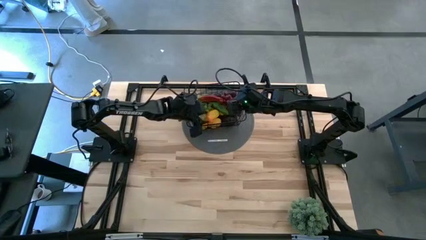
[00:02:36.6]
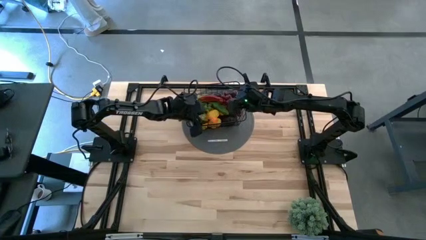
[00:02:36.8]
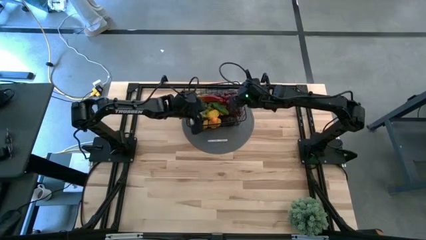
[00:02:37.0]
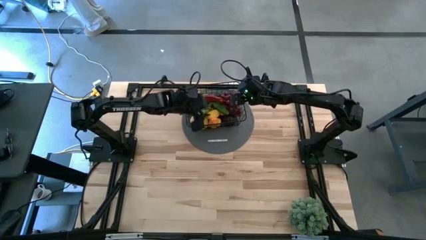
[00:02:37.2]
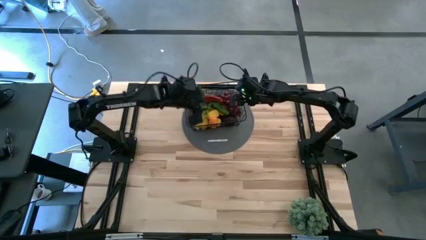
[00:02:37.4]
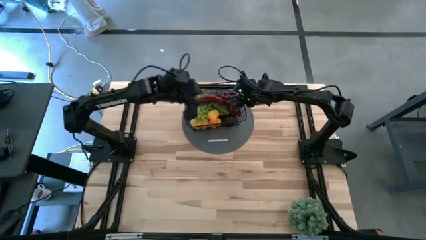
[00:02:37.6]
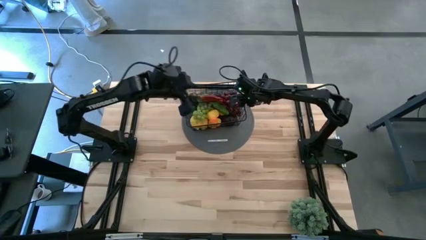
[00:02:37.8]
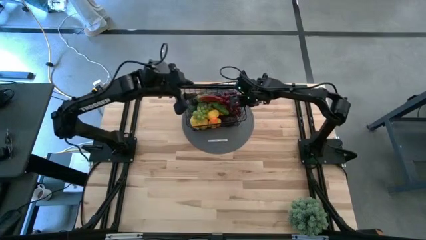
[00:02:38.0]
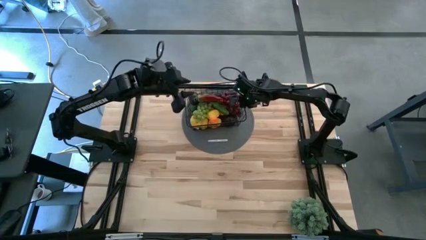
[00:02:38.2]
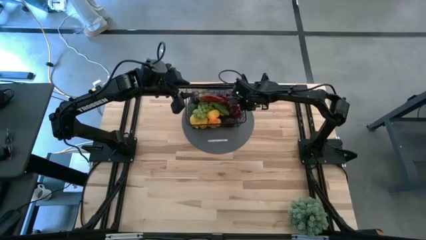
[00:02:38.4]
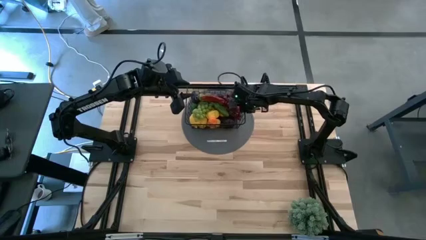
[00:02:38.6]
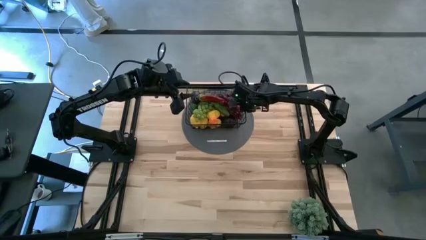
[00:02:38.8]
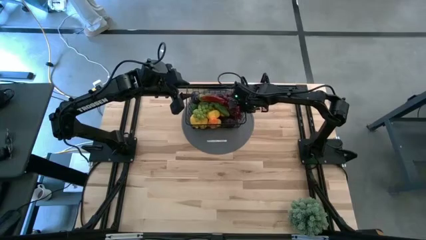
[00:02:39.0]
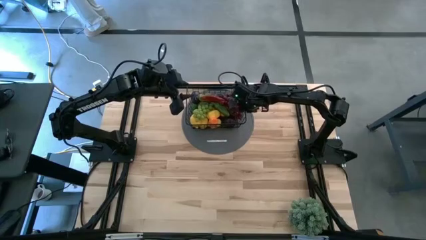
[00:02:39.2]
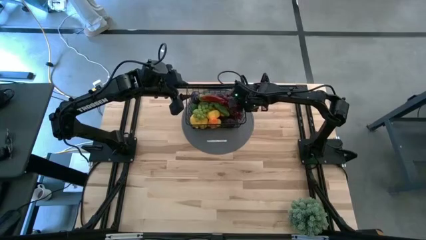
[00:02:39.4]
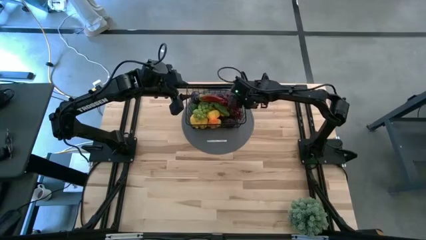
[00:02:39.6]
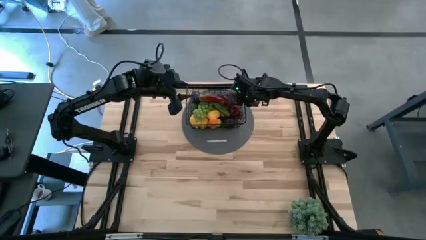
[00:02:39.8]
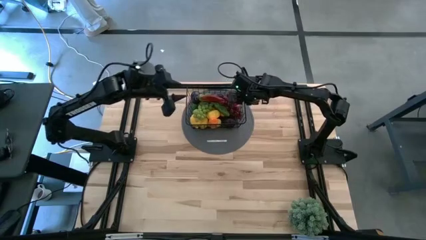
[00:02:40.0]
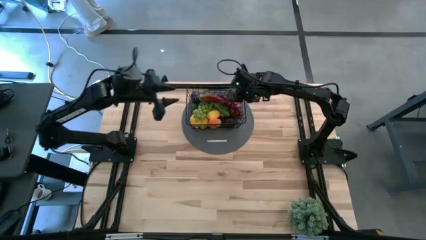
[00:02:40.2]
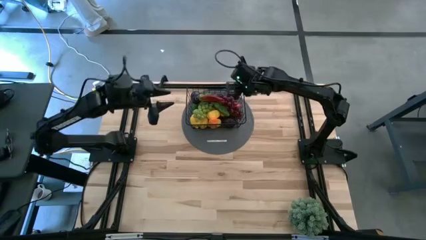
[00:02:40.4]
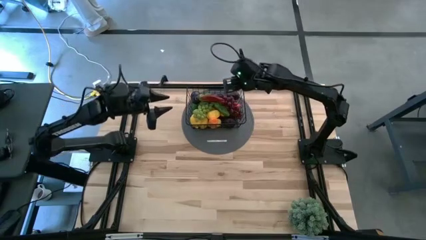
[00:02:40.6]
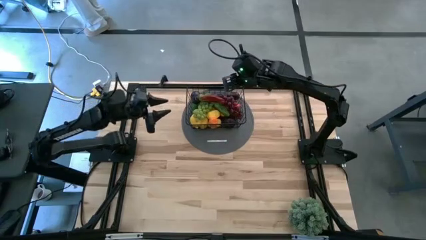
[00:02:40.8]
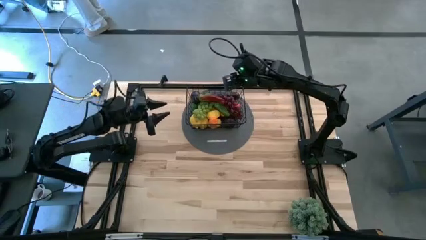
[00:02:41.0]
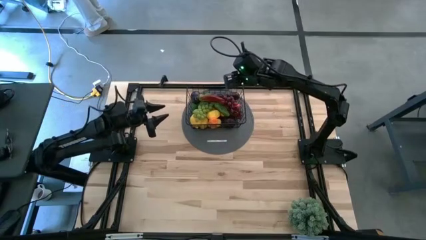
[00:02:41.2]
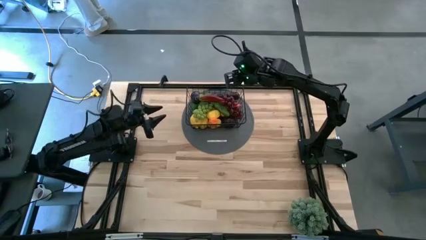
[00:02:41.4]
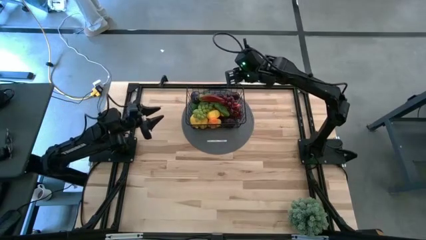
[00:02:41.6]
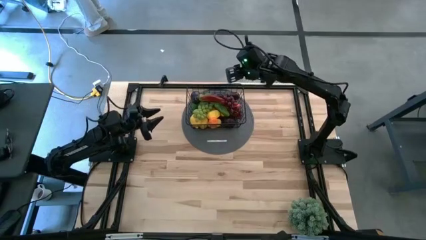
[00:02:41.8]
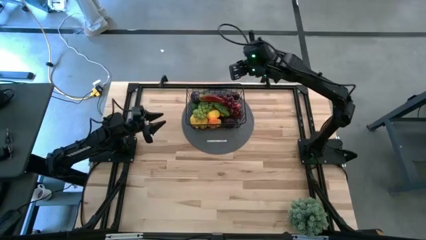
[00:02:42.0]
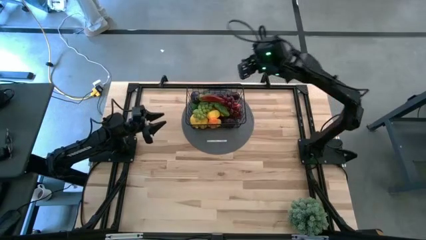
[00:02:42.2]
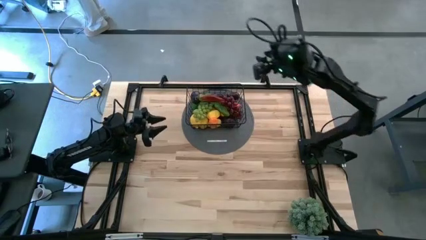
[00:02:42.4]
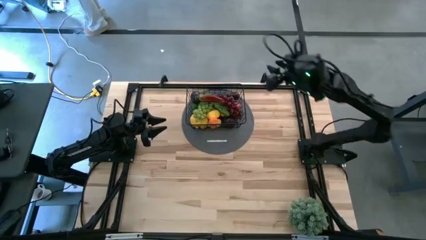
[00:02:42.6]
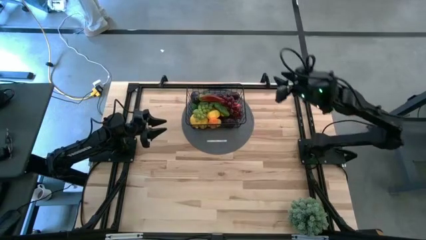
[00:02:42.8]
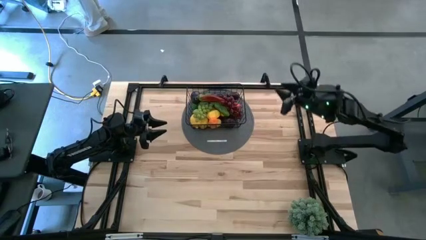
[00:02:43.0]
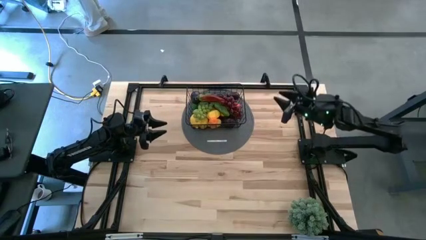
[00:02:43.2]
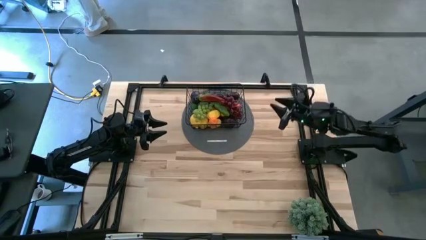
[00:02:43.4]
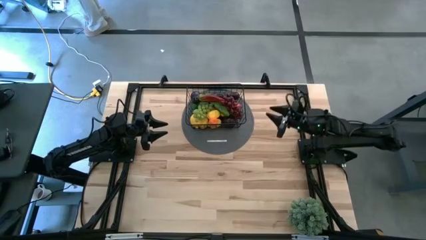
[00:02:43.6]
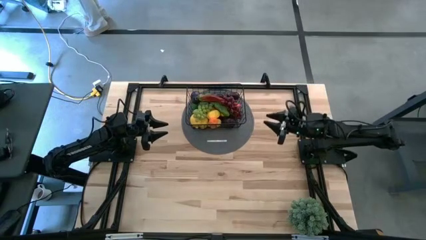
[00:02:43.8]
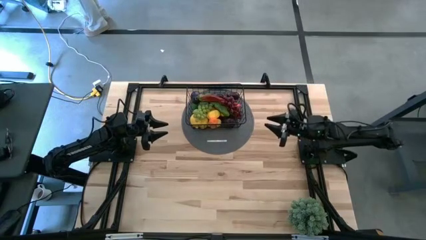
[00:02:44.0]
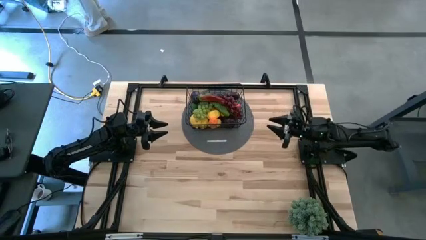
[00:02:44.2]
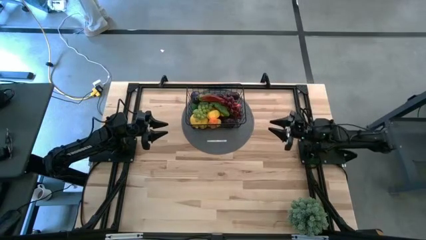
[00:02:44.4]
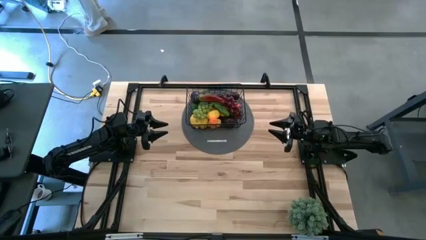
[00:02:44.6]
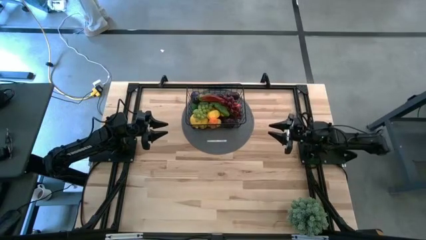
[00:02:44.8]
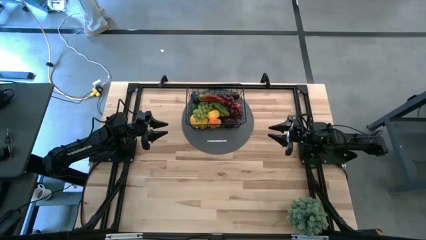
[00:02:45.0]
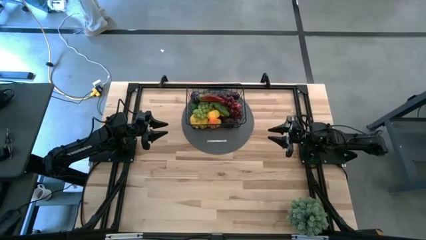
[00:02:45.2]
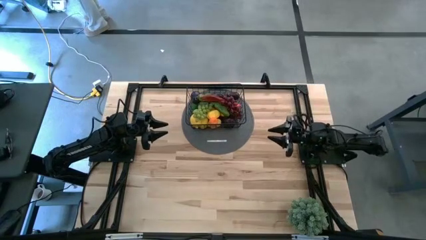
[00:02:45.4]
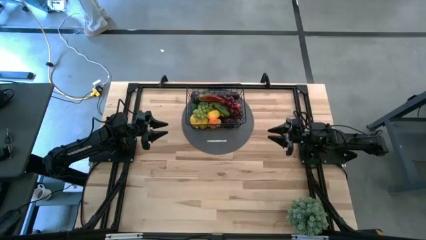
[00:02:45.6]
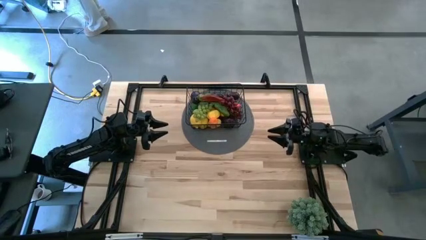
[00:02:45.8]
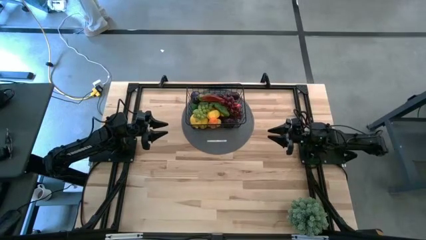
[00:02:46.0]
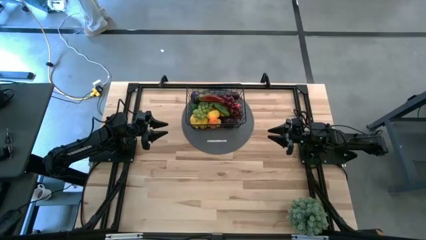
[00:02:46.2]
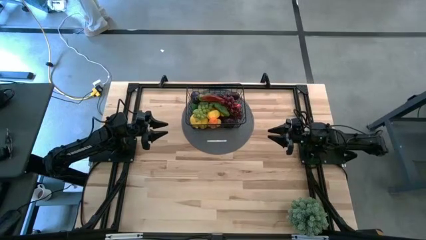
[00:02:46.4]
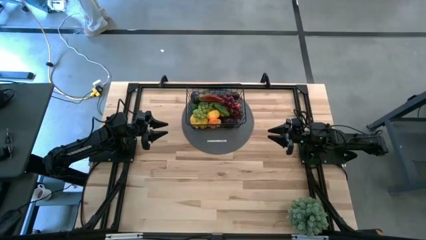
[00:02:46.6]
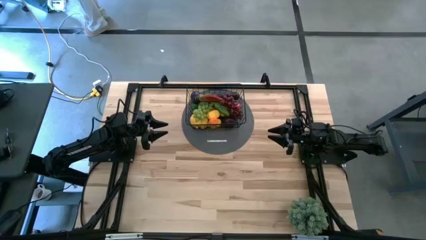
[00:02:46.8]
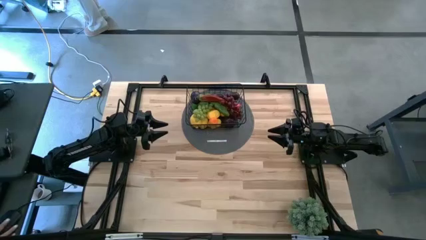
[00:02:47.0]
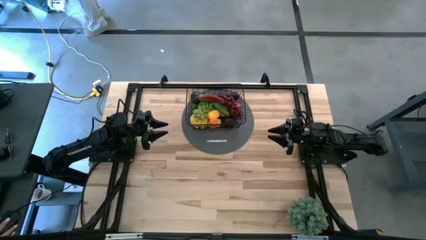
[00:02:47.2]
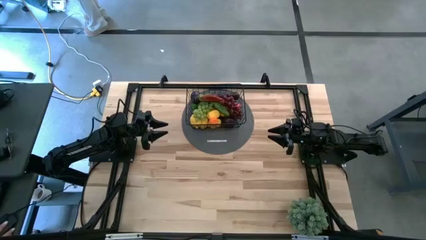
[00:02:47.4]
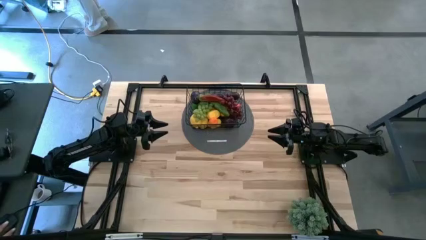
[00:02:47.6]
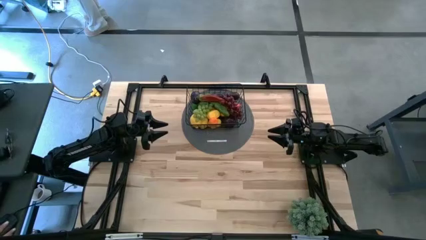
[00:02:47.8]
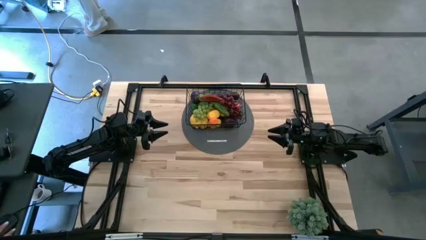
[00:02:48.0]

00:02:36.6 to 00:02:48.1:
Task: Build produce basket
Return to Home Position

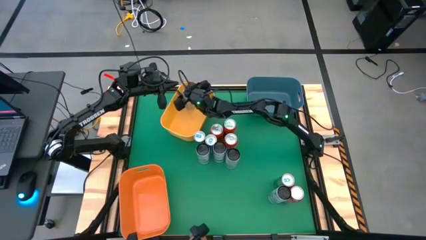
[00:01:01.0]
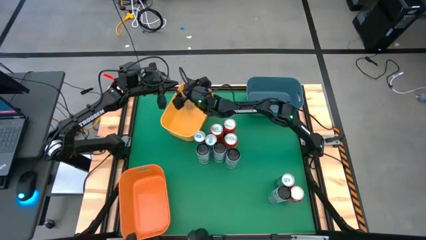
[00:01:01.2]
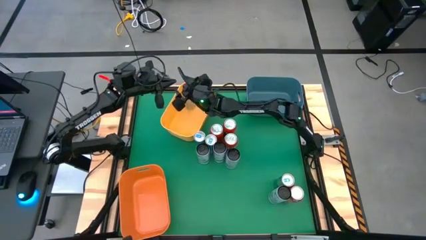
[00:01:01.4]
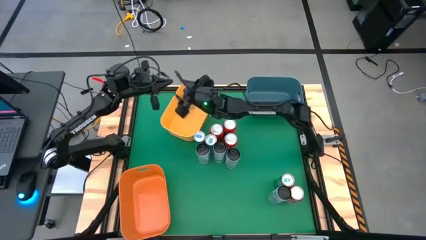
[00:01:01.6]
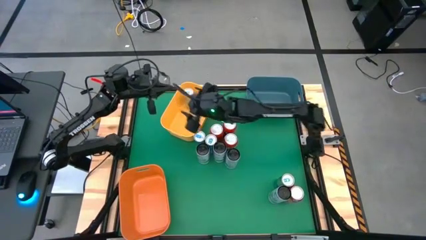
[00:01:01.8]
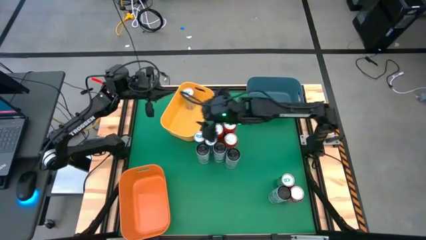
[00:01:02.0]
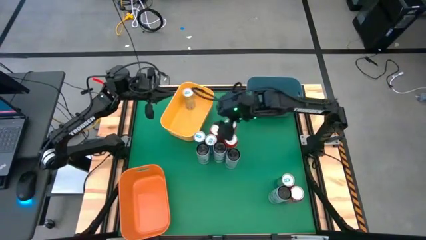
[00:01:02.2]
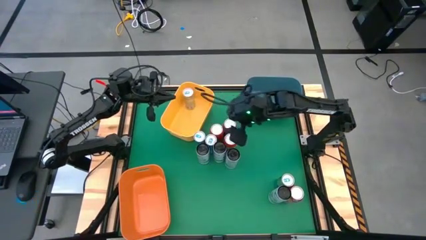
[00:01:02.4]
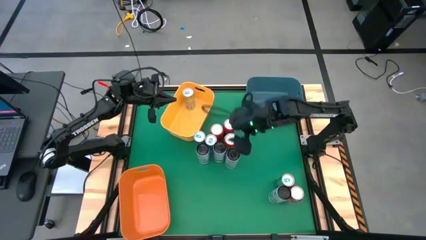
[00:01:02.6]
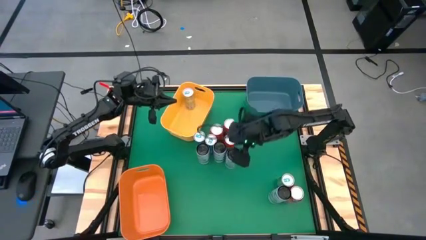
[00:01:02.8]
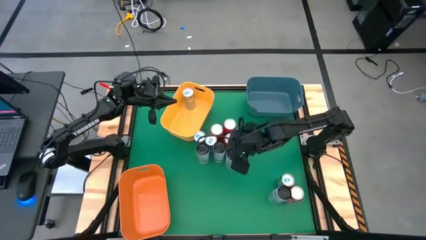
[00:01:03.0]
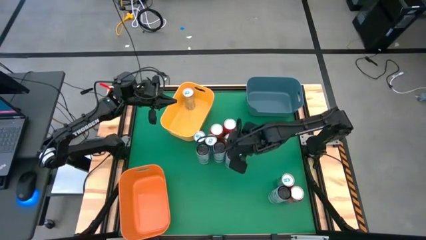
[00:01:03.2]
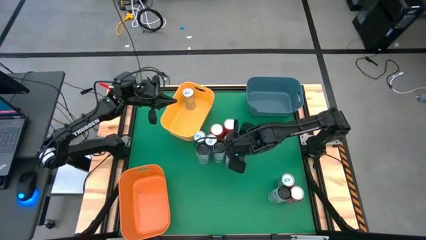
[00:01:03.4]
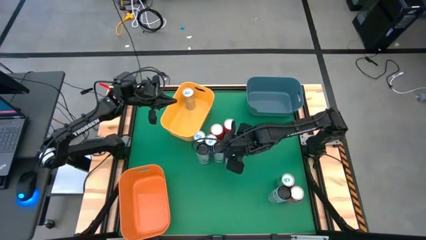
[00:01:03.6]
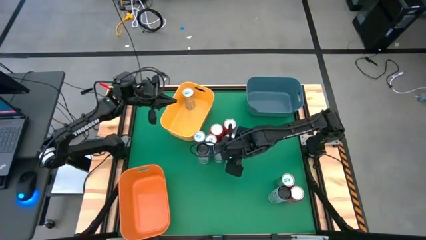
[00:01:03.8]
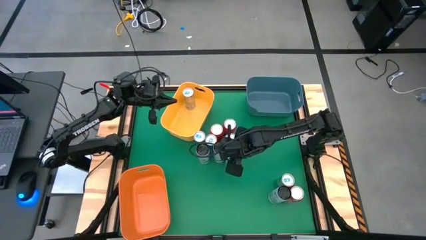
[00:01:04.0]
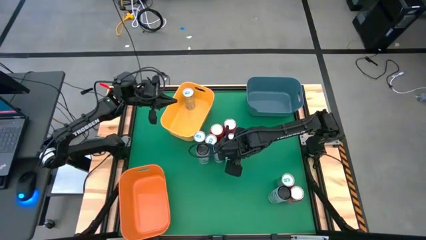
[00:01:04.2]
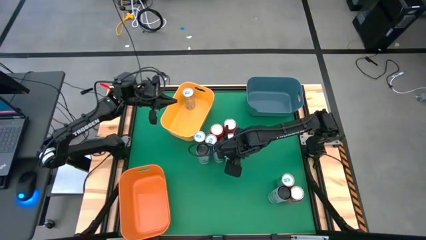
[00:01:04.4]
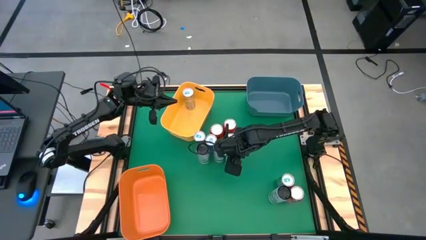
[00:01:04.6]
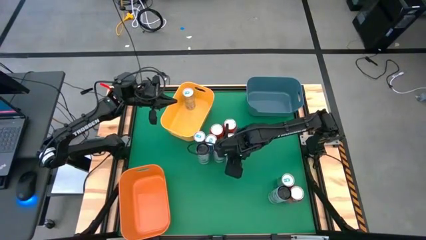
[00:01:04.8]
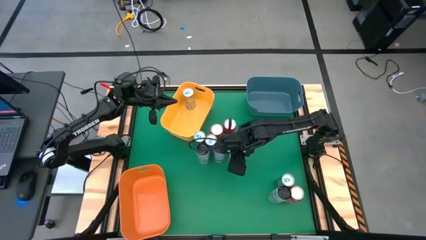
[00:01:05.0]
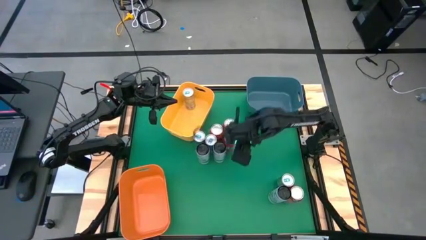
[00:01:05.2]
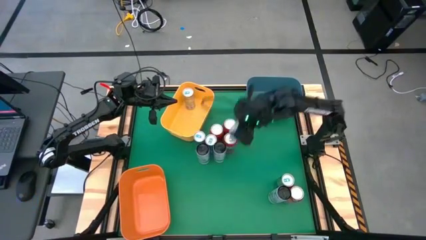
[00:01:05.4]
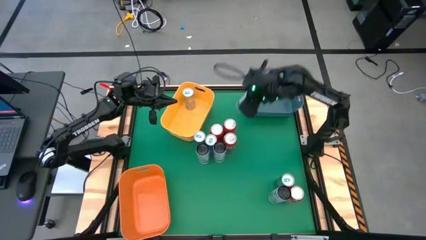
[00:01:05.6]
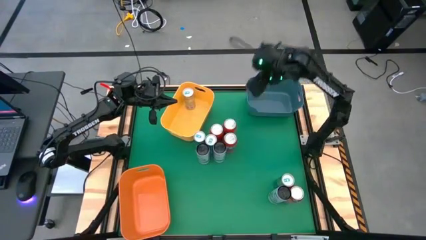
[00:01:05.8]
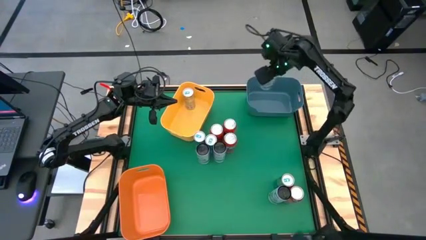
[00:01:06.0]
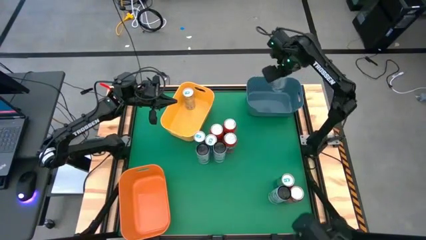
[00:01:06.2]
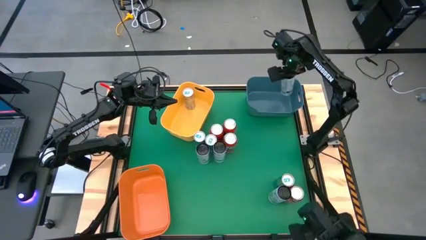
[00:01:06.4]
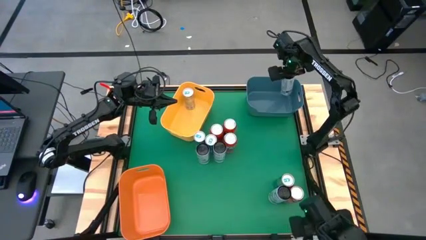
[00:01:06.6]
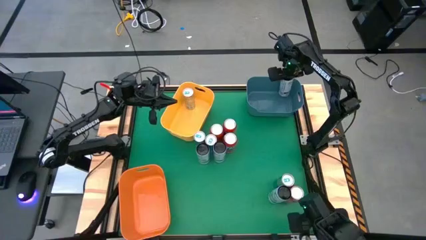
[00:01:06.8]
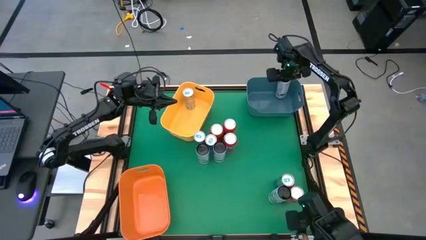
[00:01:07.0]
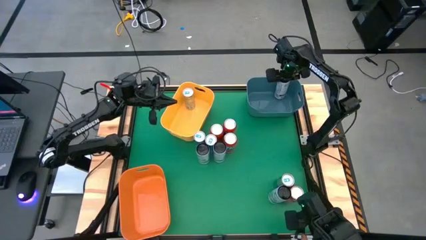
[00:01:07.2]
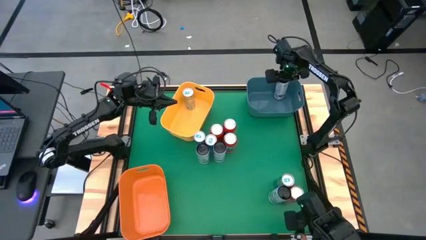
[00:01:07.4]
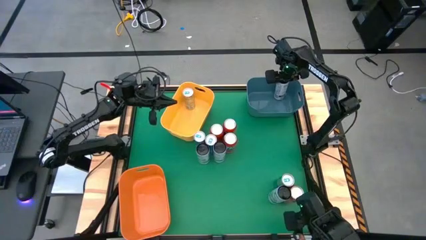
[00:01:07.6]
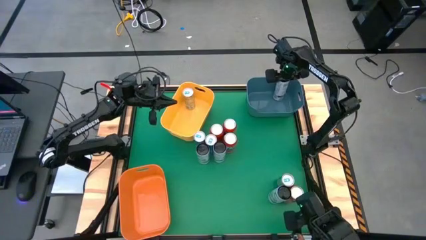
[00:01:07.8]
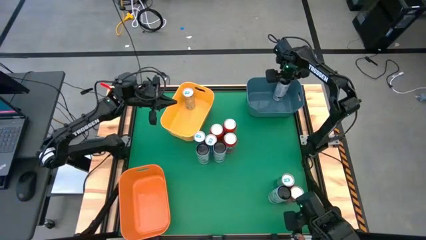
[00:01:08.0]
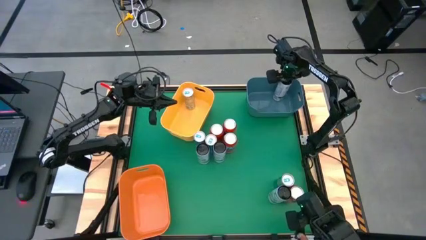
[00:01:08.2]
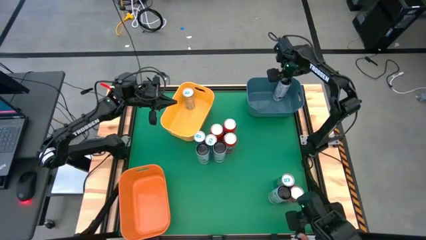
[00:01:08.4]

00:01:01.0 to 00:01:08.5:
Task: Sort soda cans
Put the white blue soda can into the blue bin
